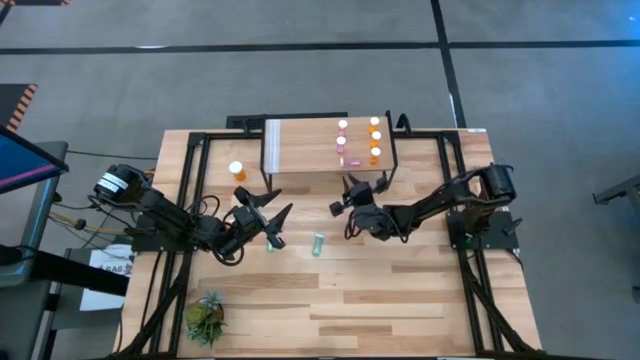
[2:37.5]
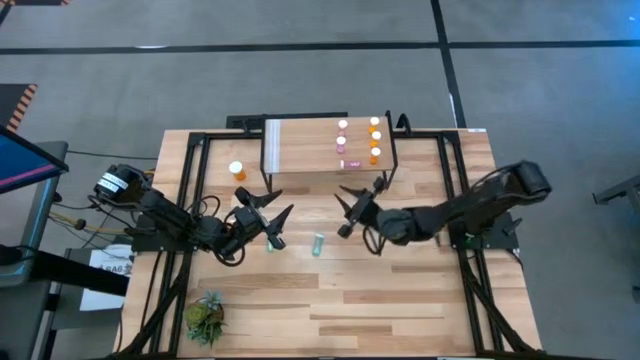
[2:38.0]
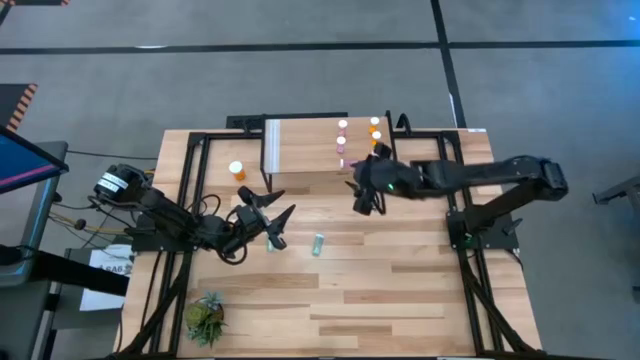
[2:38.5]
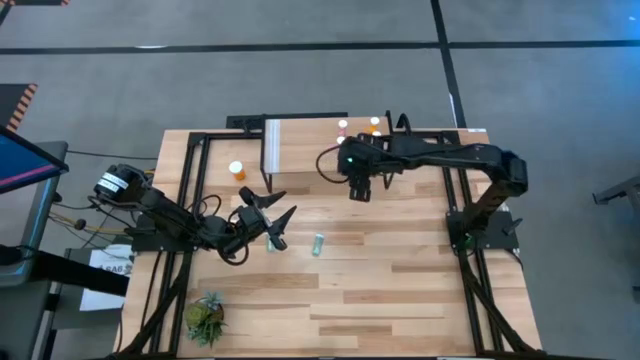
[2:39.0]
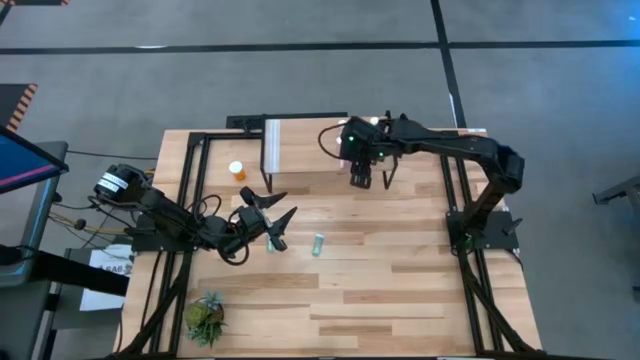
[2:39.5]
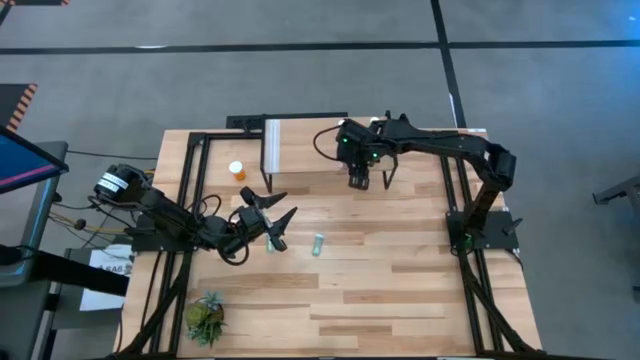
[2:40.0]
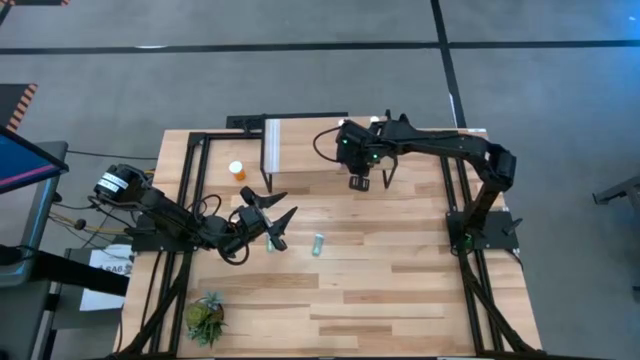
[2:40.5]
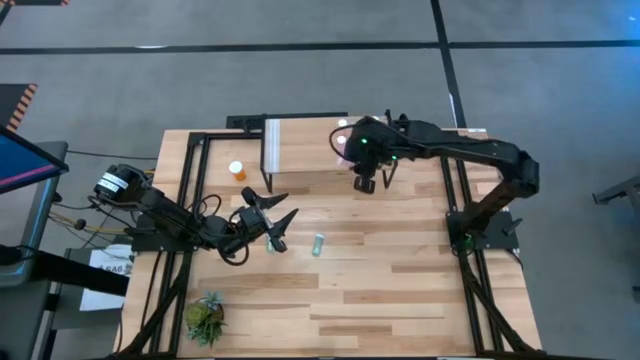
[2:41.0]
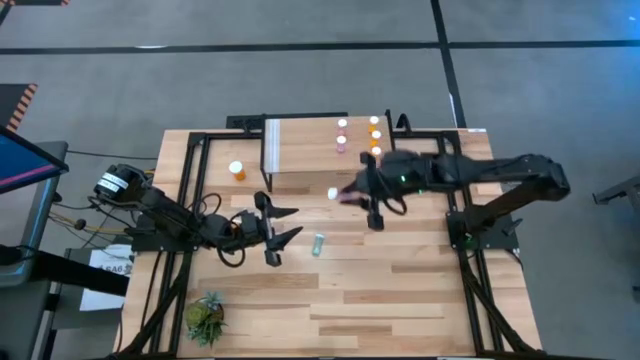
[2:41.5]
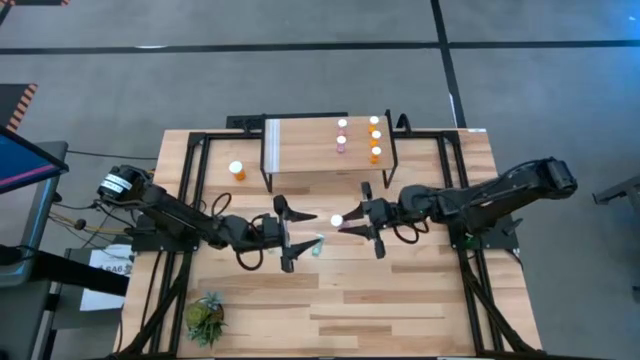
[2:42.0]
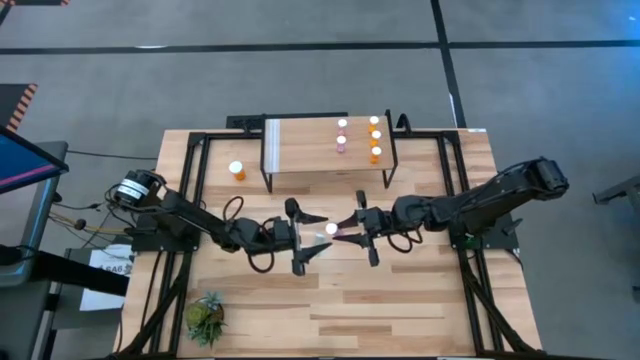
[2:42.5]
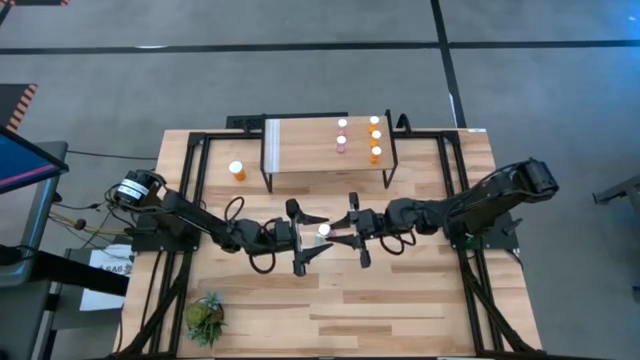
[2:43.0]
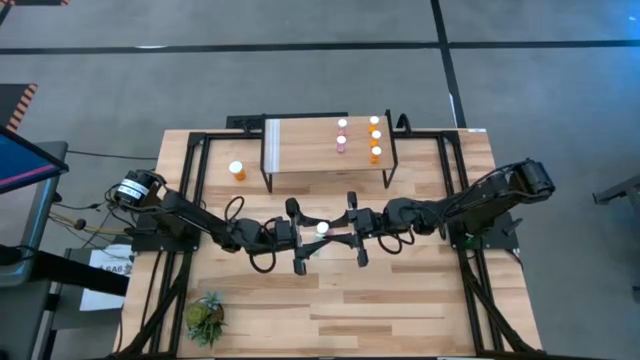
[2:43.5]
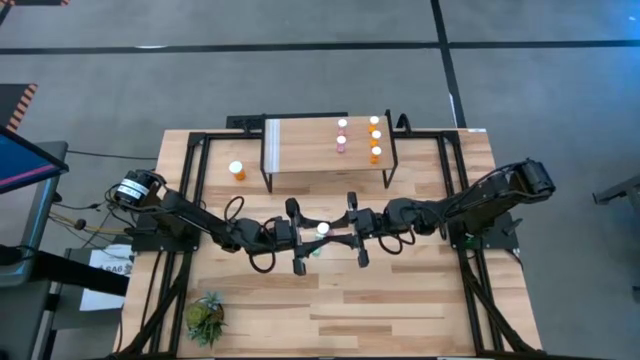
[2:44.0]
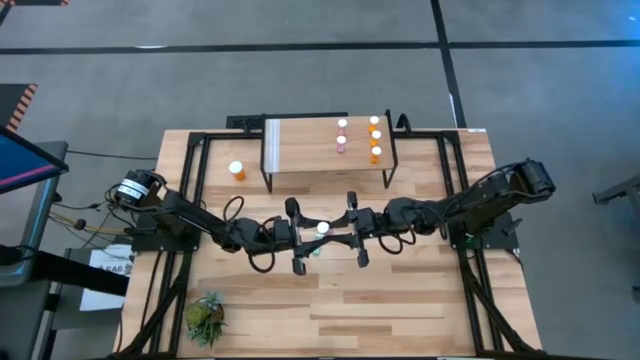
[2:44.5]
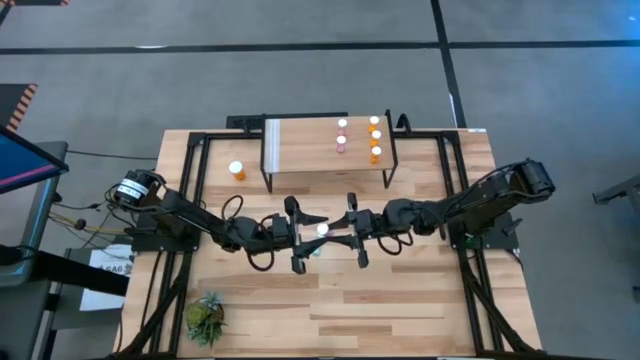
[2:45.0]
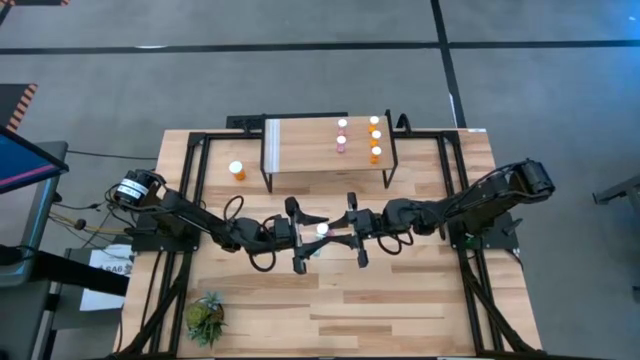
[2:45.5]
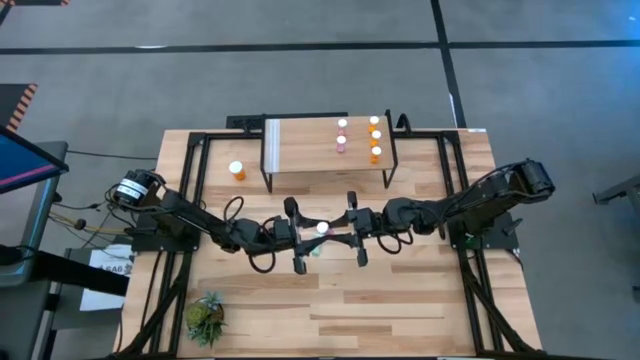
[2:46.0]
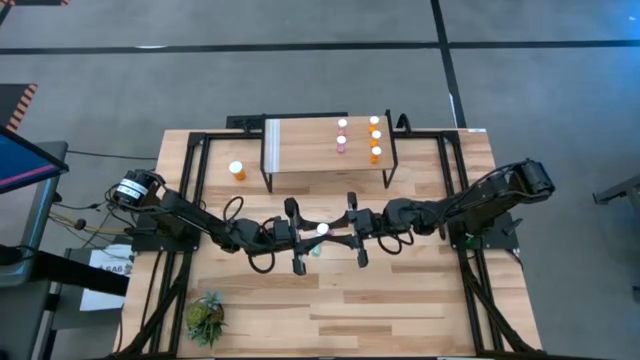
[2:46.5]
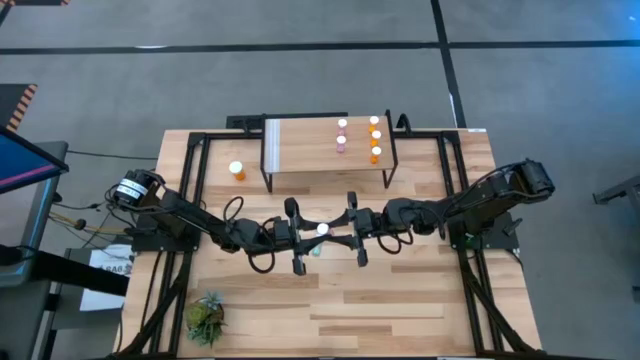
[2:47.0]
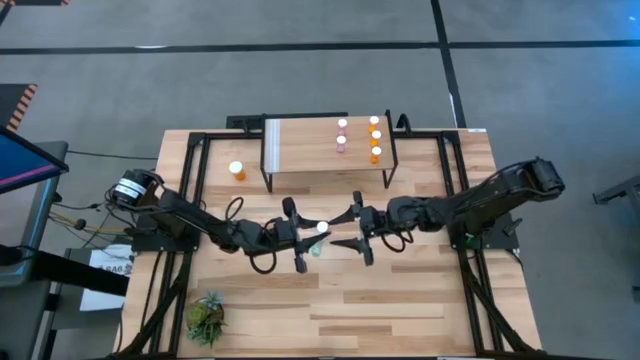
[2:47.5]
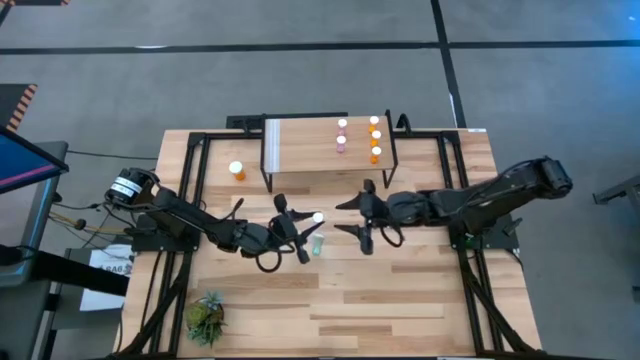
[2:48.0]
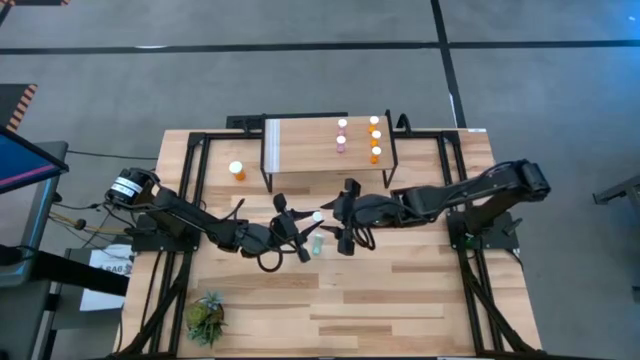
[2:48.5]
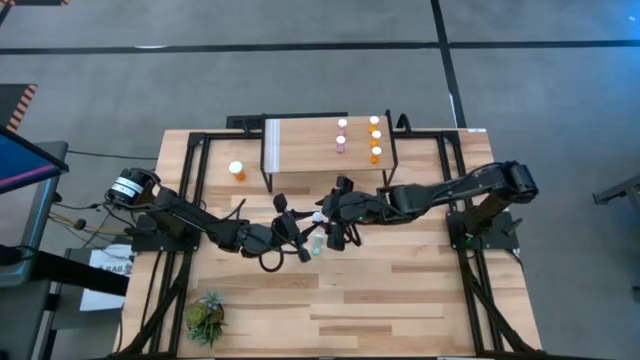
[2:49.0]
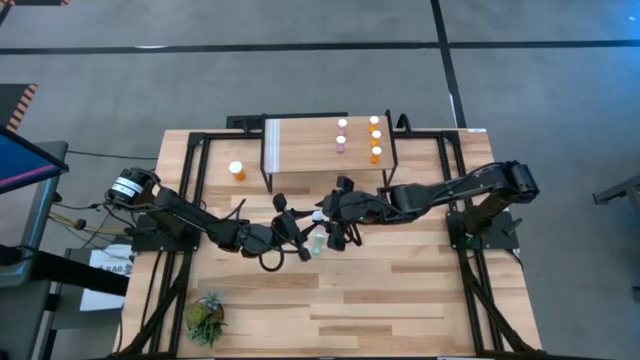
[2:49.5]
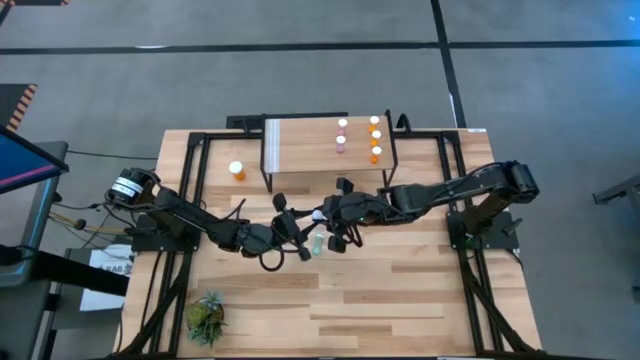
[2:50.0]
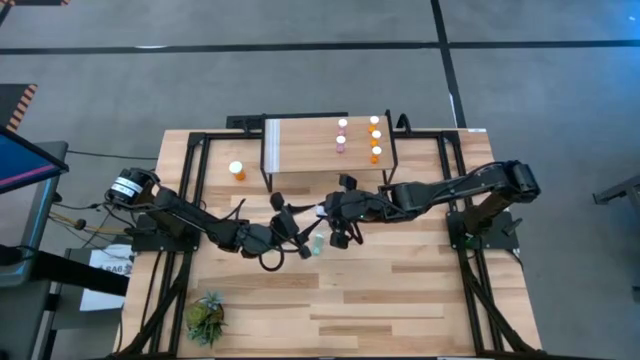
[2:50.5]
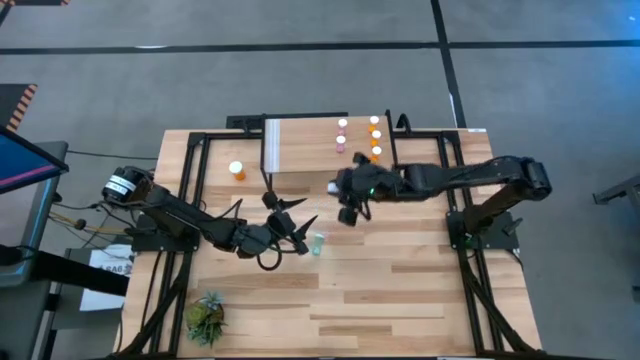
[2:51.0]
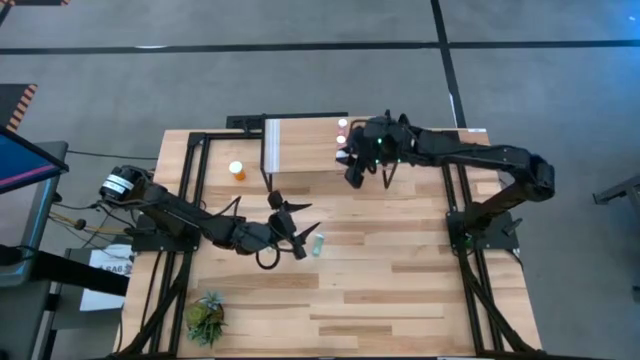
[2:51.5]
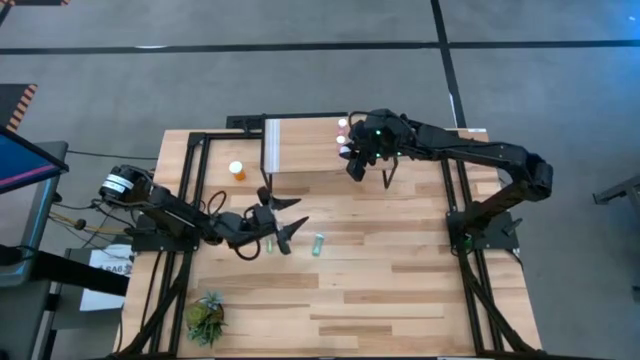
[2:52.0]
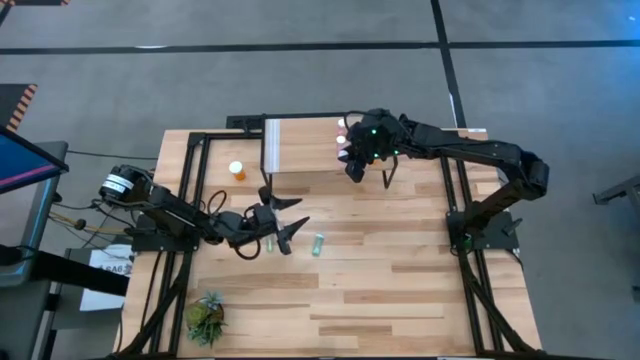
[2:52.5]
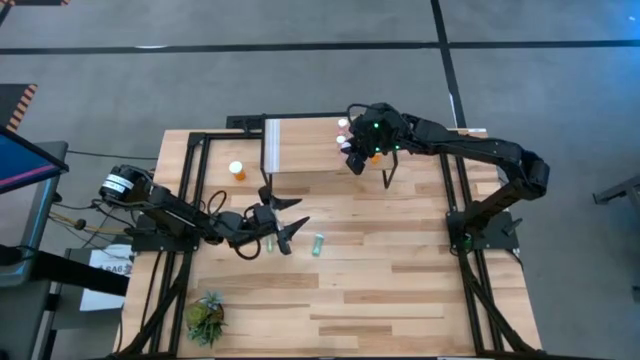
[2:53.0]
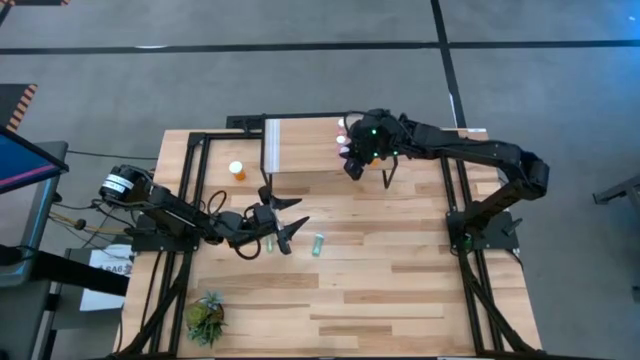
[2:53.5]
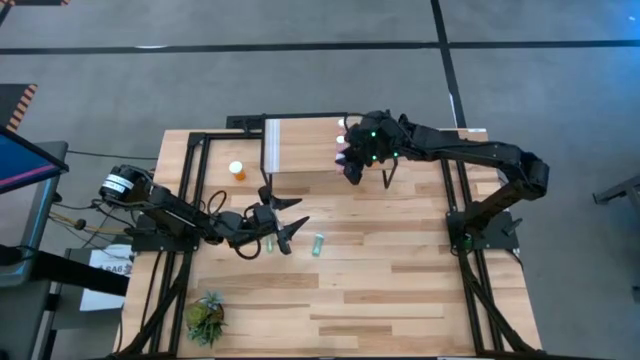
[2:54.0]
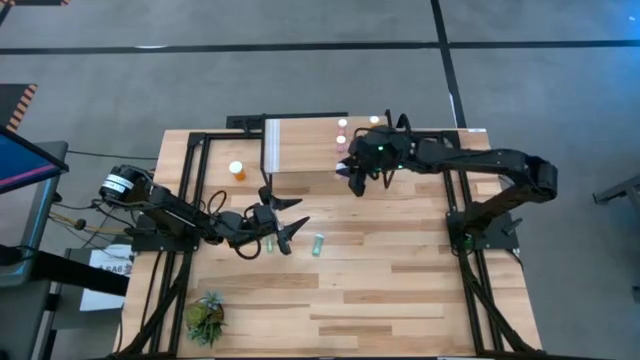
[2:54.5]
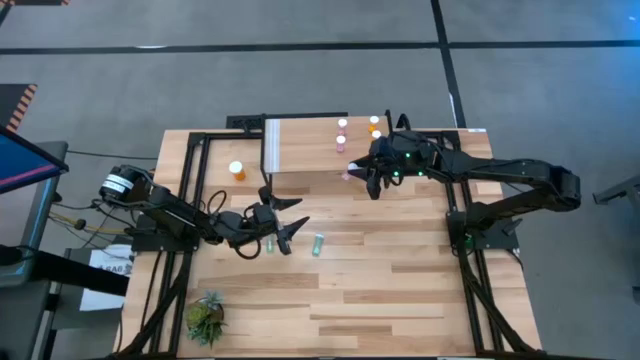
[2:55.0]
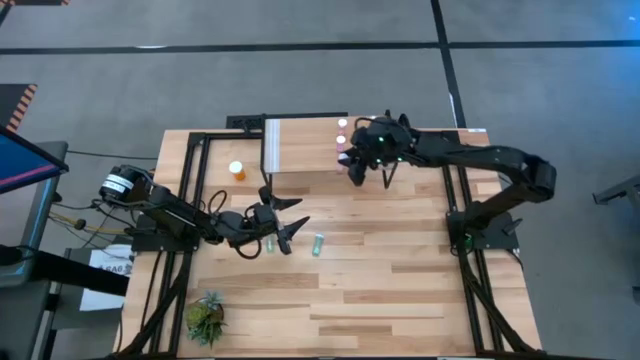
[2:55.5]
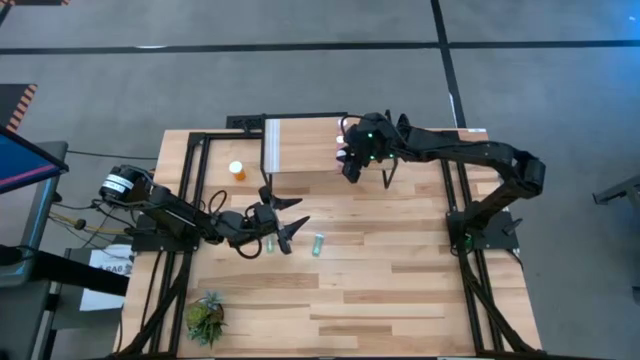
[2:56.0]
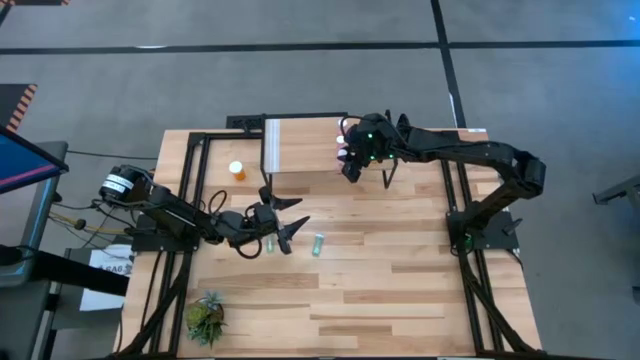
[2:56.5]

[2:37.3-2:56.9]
Task: Pick and place medicine bottles onto shelf by color
Put the pink pill bottle on the shelf

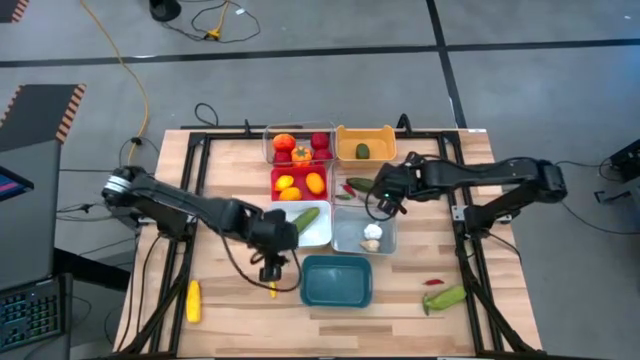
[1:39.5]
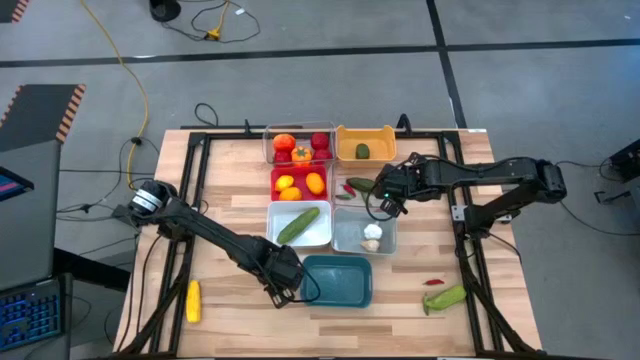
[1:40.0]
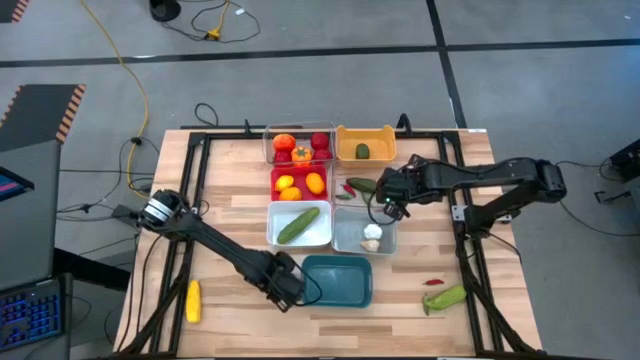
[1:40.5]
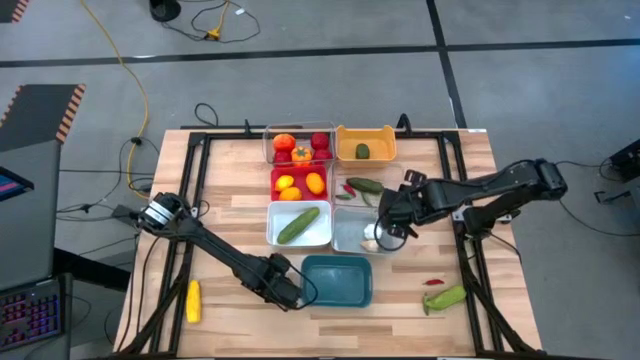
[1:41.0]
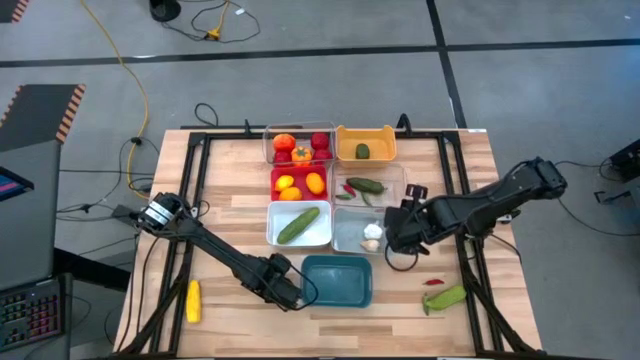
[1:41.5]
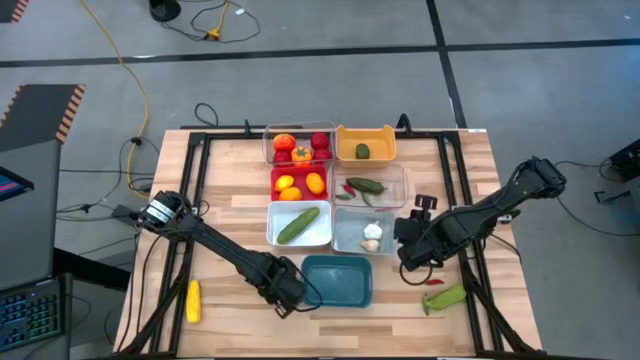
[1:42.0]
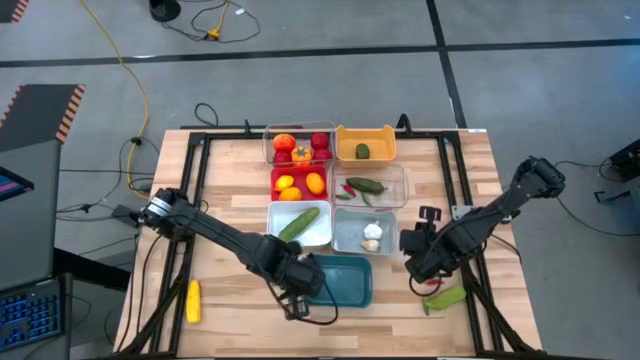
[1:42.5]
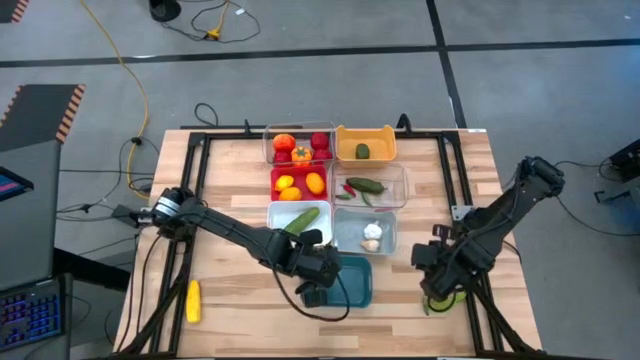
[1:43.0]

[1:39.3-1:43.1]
Task: Sort produce into baskets
Put the right yellow corn into the blue bin
